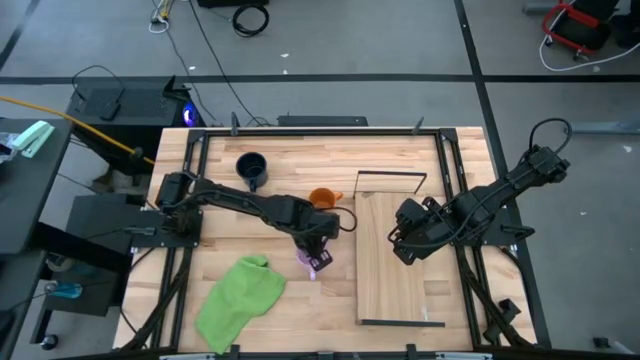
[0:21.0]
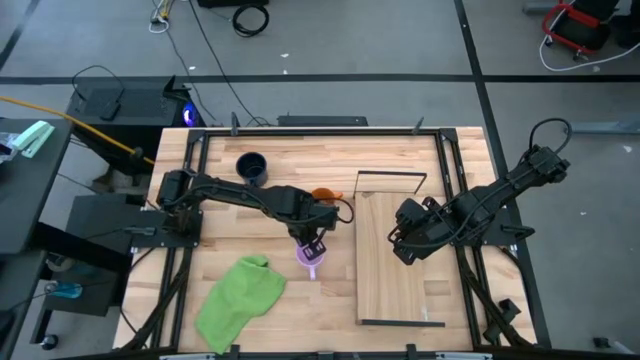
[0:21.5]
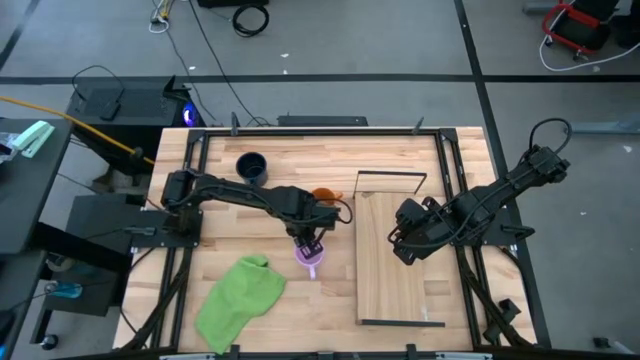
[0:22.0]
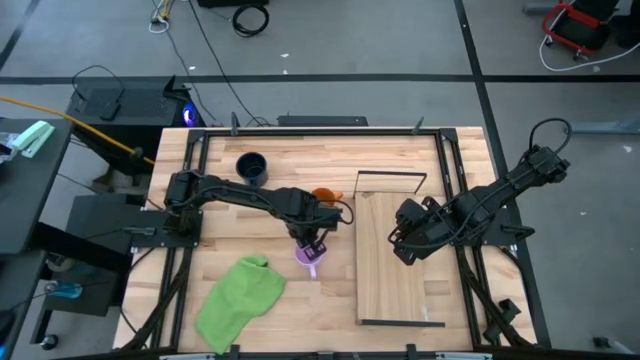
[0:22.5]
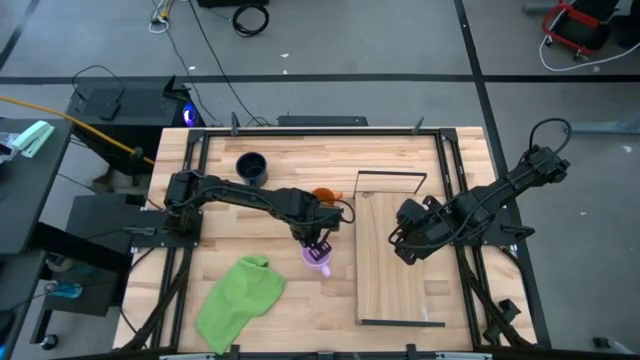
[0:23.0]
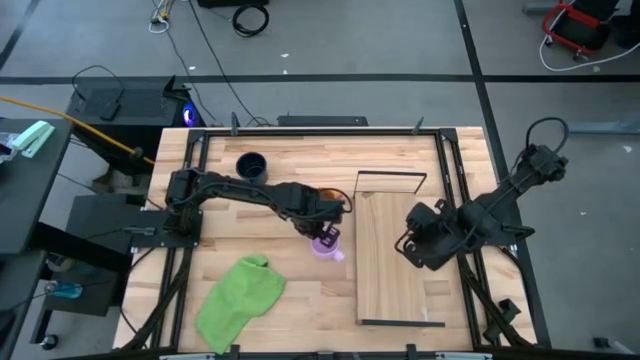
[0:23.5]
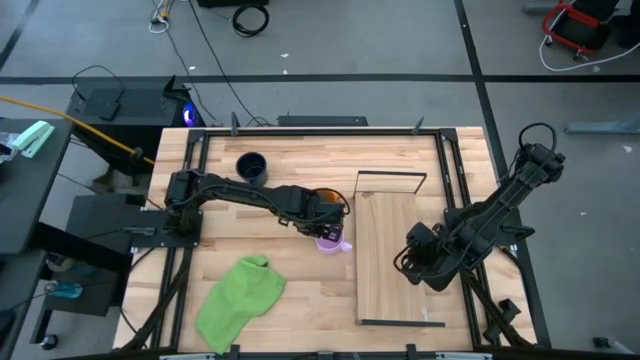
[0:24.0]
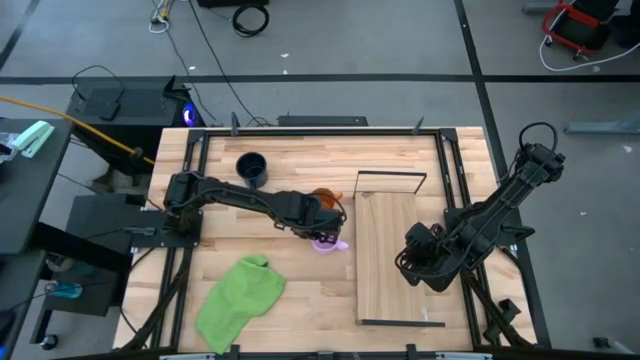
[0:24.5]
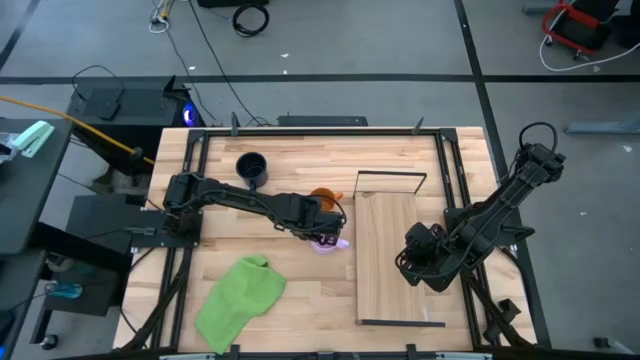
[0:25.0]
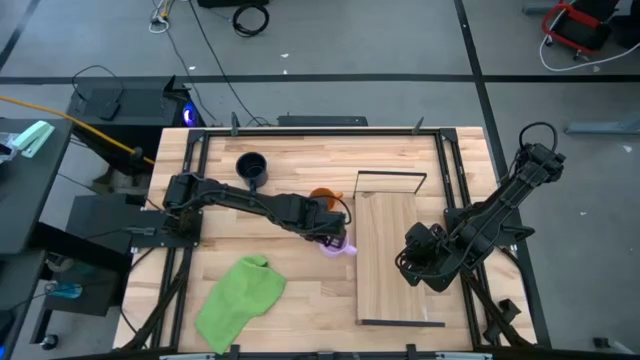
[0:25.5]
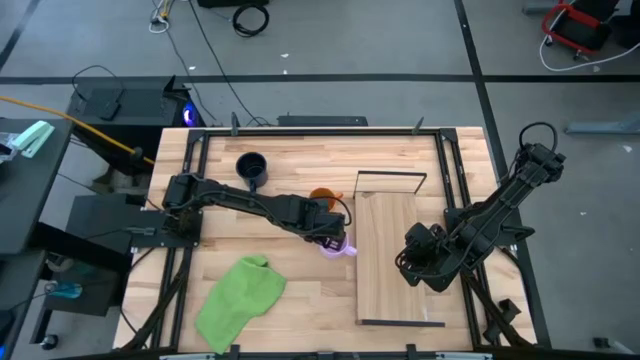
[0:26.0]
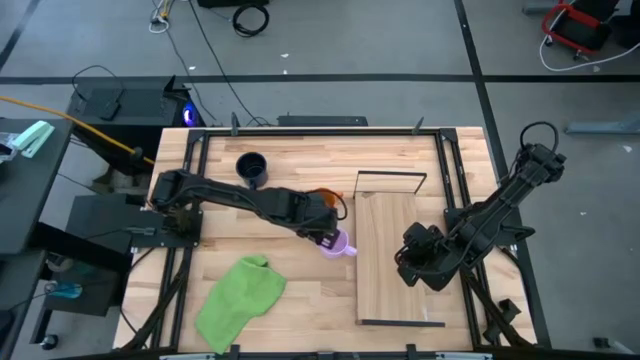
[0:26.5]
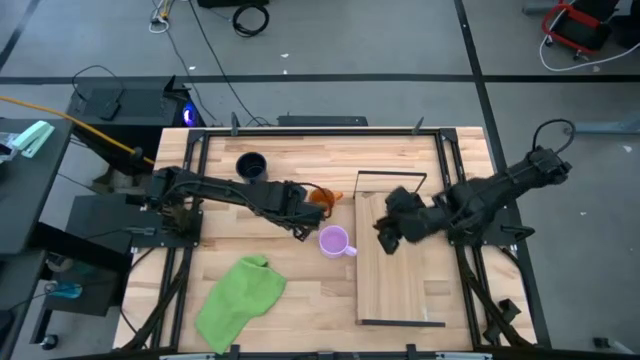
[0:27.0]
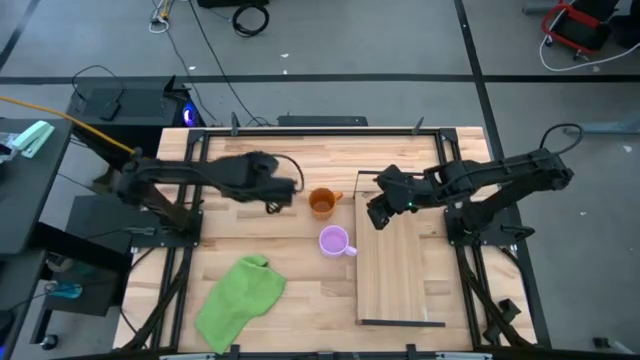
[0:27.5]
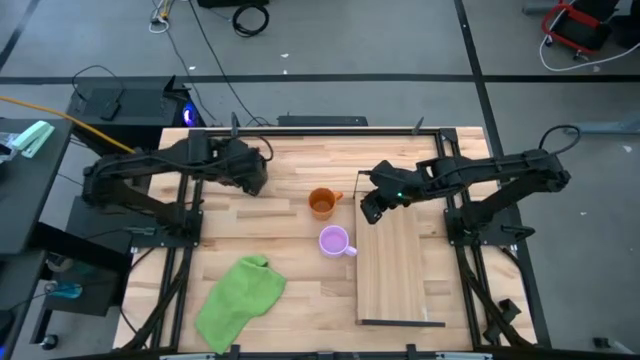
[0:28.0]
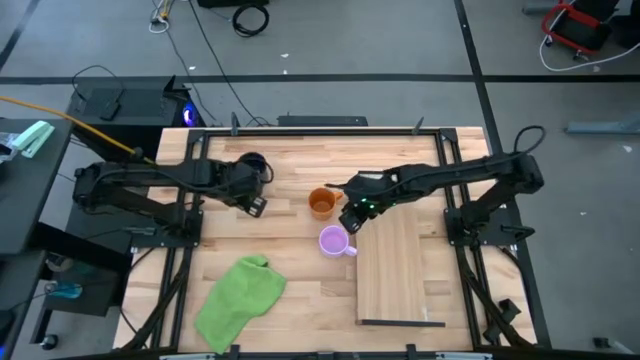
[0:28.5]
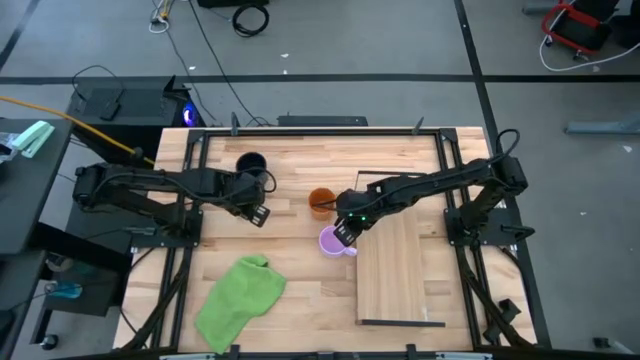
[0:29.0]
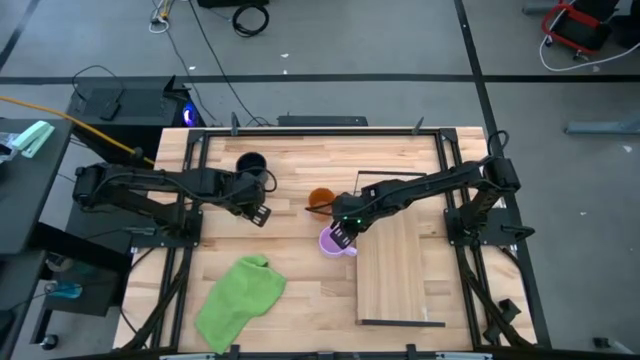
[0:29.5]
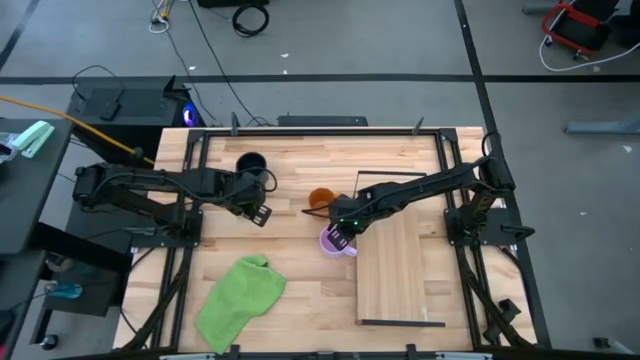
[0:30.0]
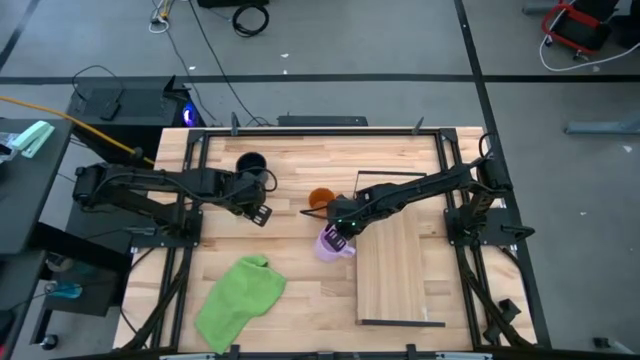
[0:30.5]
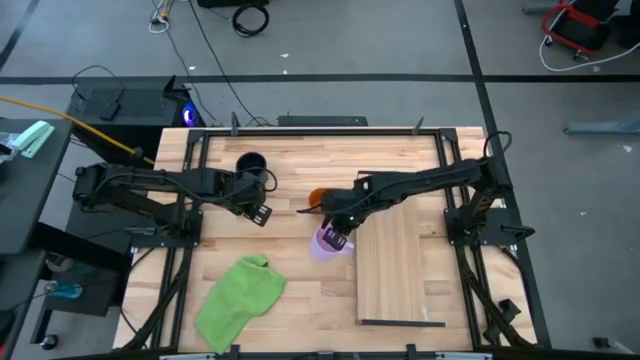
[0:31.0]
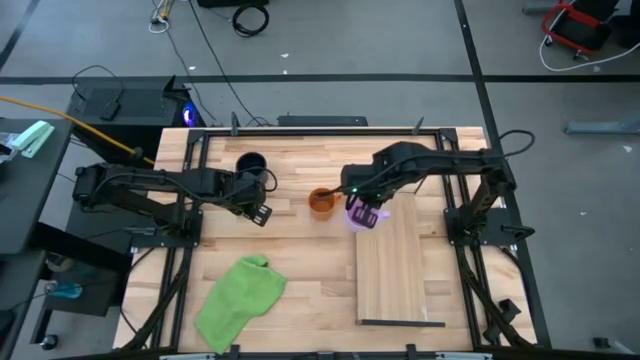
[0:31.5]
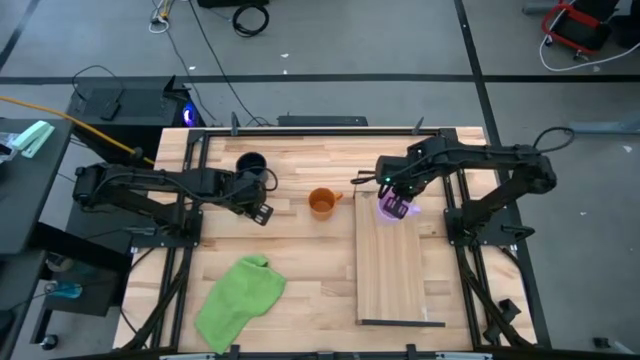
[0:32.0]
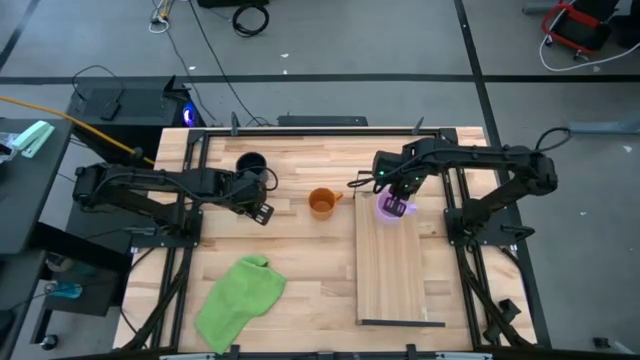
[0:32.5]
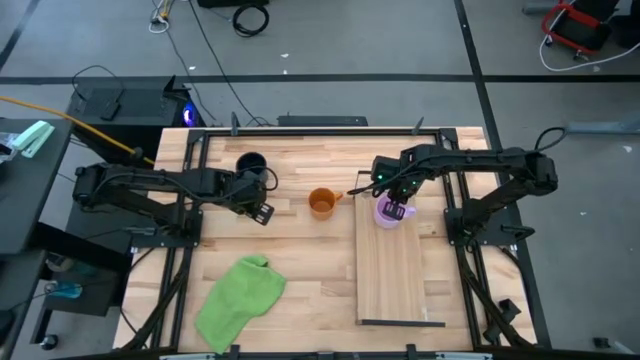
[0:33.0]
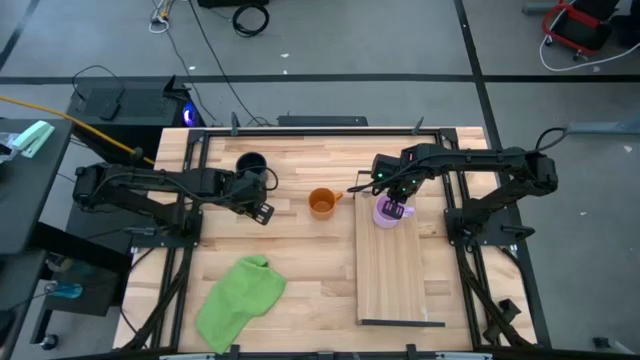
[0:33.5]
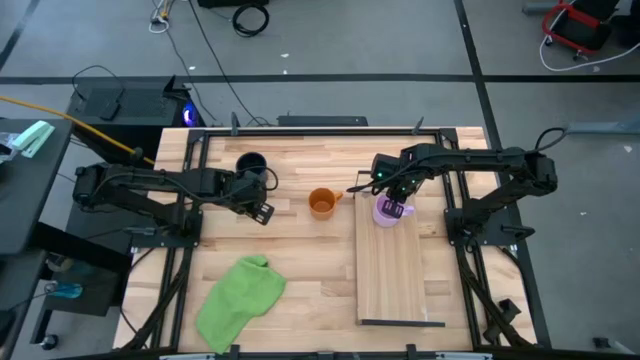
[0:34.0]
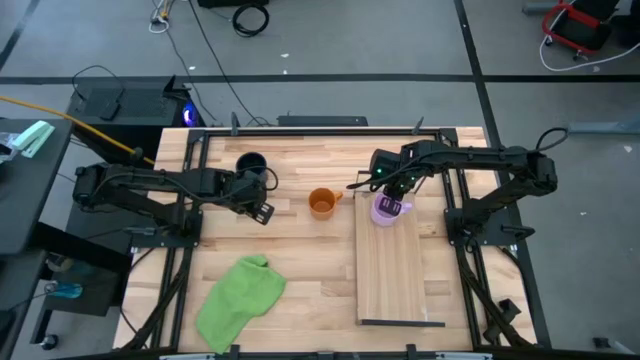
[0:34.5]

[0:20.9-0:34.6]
Task: Stack small to large cups/mugs on shelf
Put the purple mug on the shelf

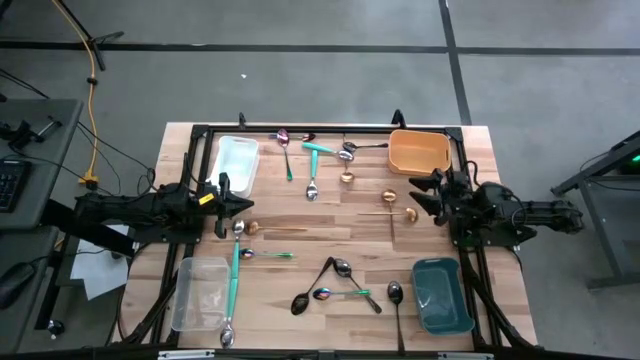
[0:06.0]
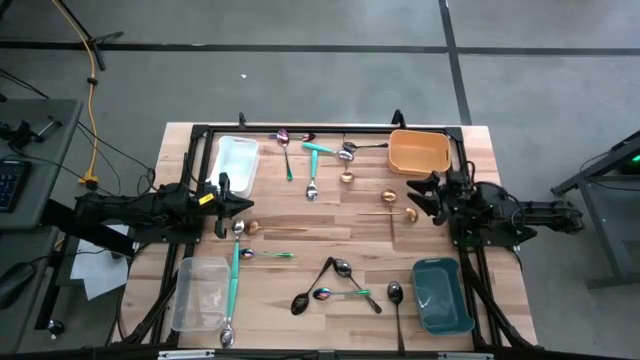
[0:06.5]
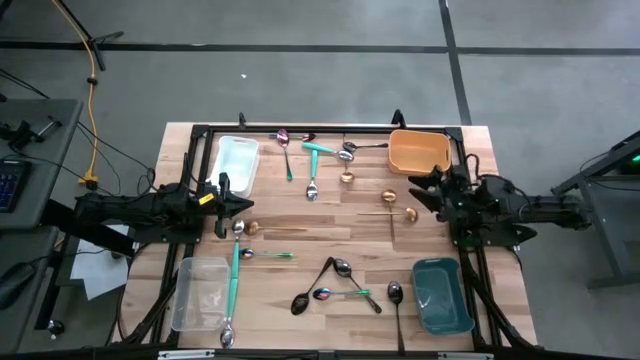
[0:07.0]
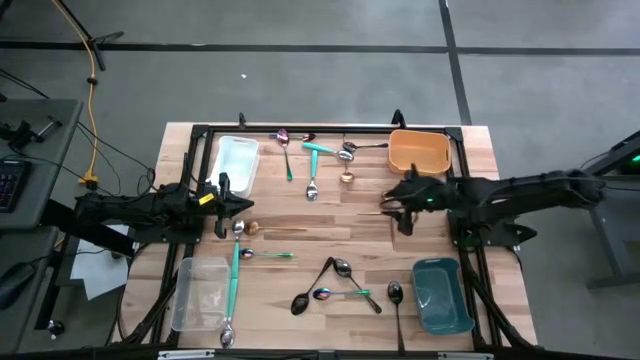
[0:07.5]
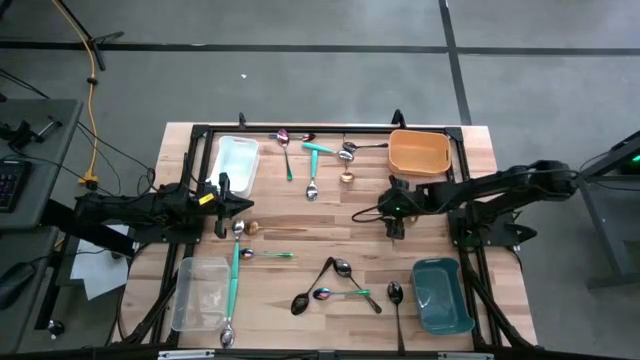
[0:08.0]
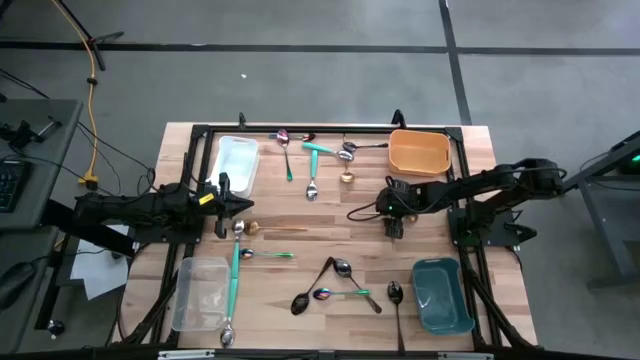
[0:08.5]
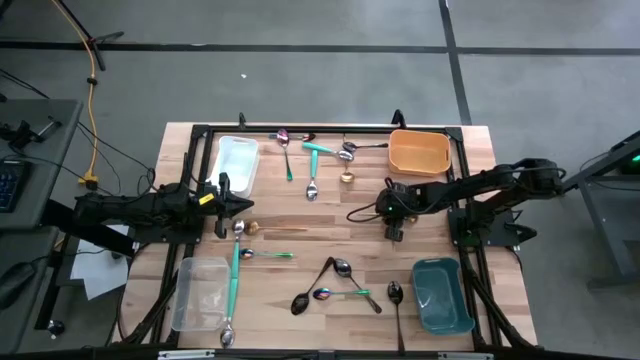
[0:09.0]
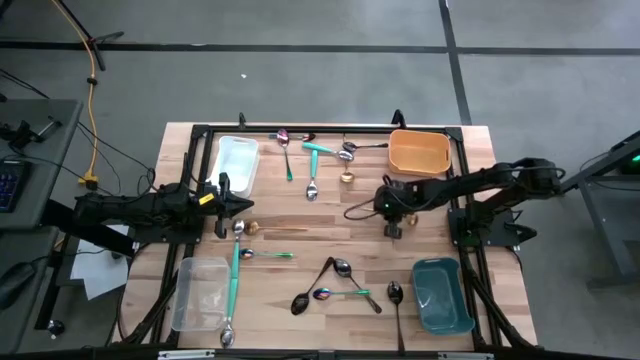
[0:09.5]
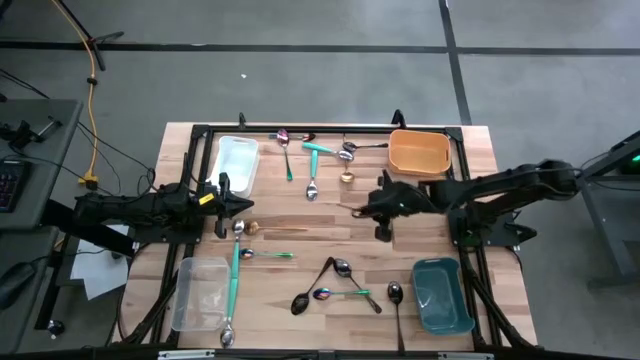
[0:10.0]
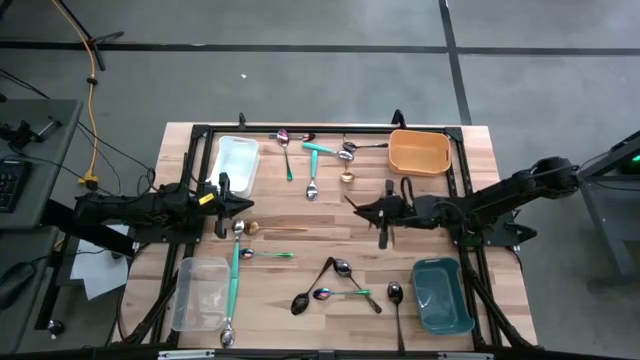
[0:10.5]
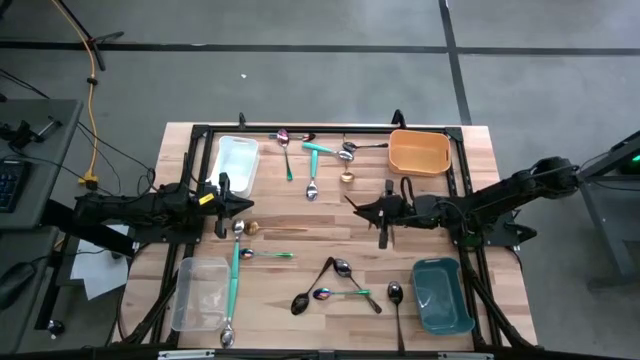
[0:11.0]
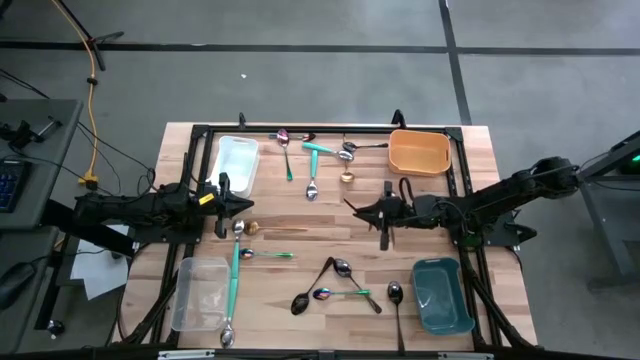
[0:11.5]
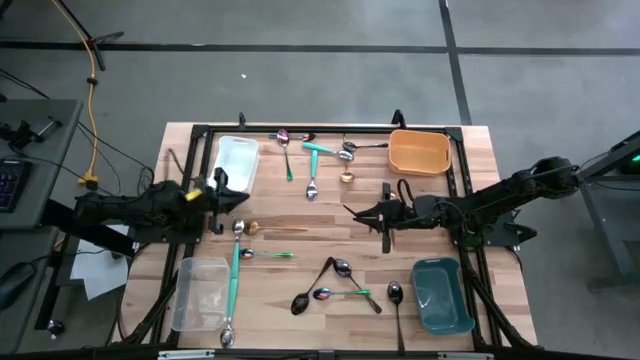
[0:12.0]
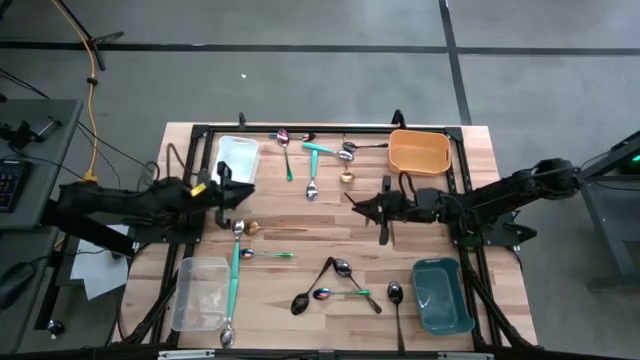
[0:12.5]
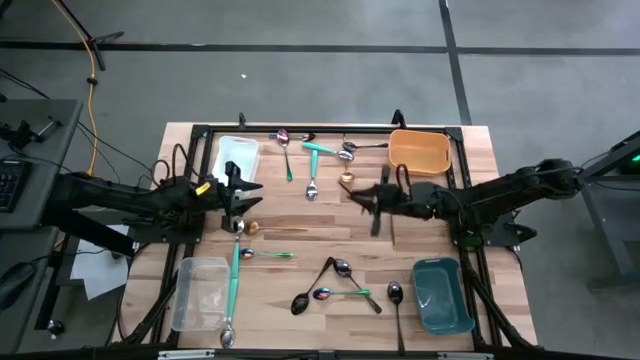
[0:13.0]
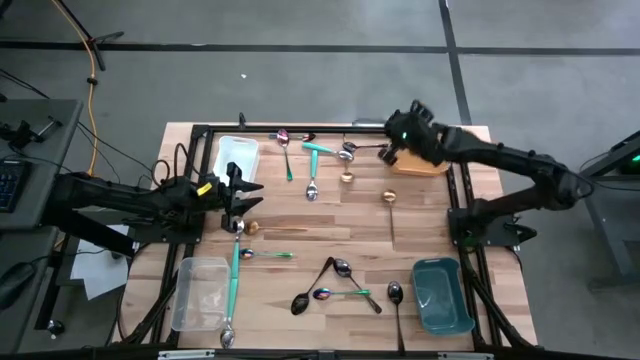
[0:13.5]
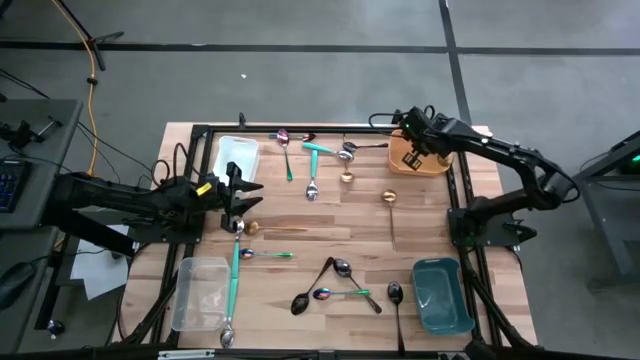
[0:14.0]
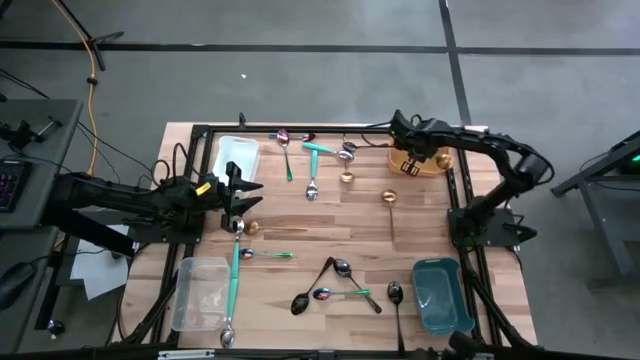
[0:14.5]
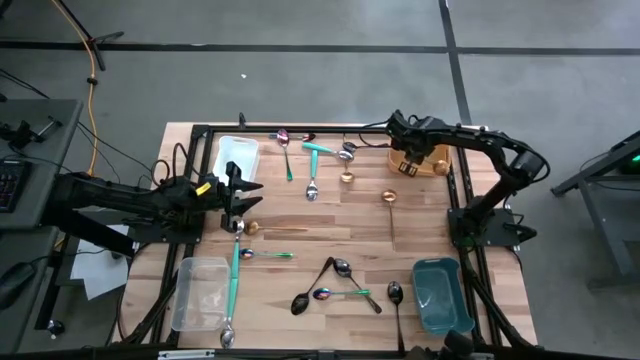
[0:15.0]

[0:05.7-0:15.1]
Task: Sort silverware by color (type)
Put the gold spoon into the yellow bin
